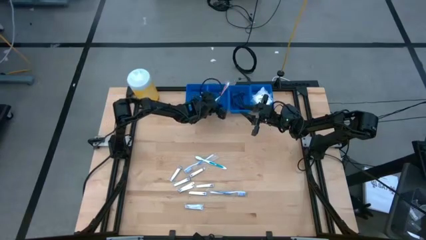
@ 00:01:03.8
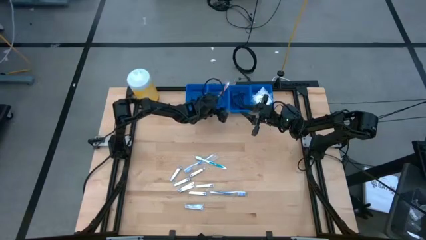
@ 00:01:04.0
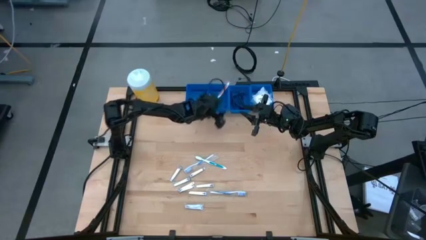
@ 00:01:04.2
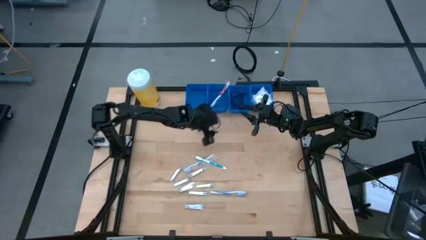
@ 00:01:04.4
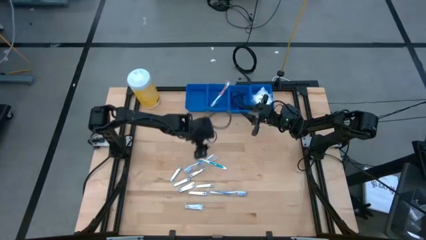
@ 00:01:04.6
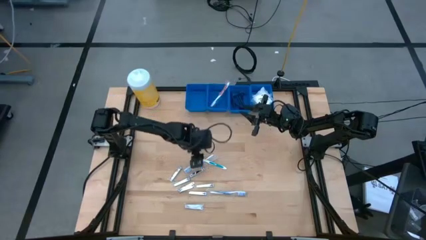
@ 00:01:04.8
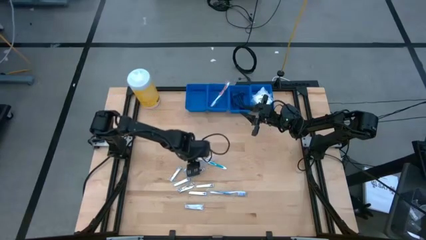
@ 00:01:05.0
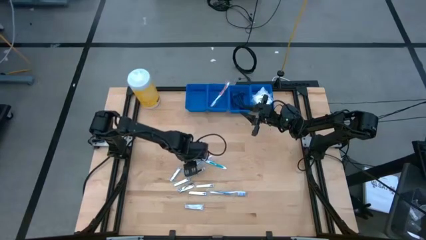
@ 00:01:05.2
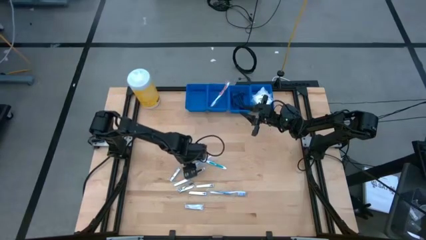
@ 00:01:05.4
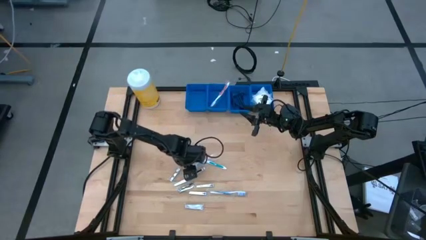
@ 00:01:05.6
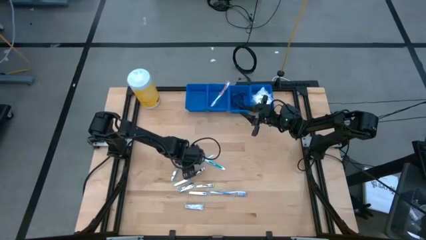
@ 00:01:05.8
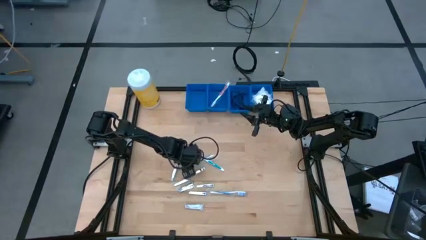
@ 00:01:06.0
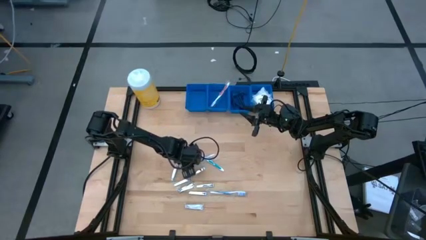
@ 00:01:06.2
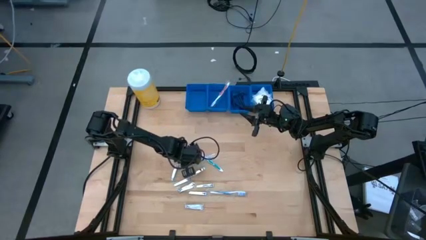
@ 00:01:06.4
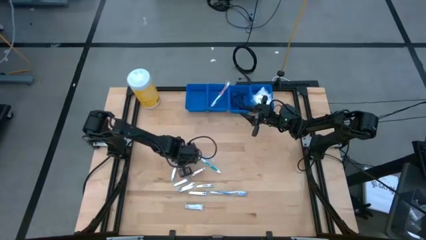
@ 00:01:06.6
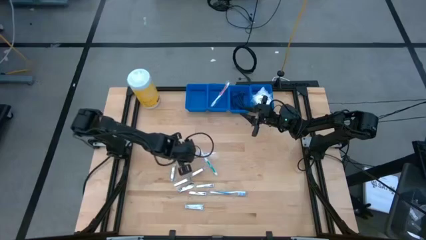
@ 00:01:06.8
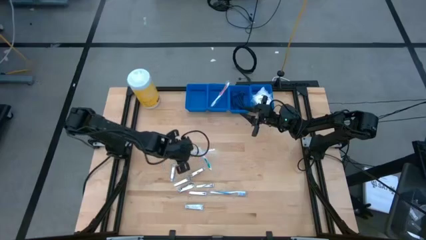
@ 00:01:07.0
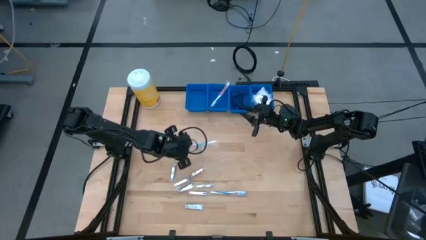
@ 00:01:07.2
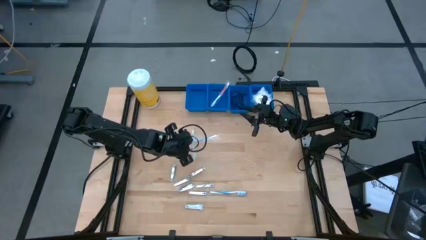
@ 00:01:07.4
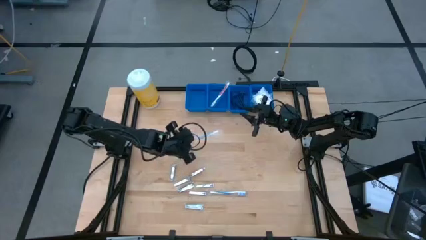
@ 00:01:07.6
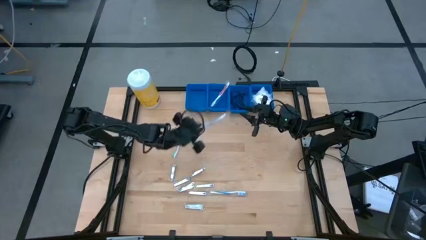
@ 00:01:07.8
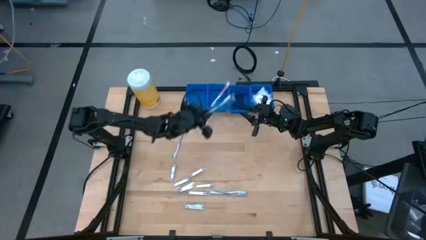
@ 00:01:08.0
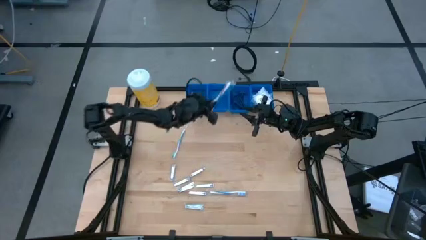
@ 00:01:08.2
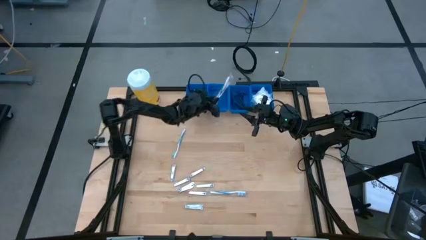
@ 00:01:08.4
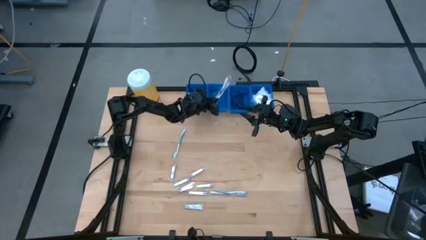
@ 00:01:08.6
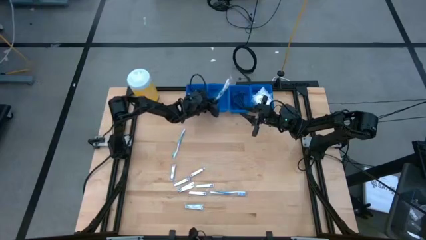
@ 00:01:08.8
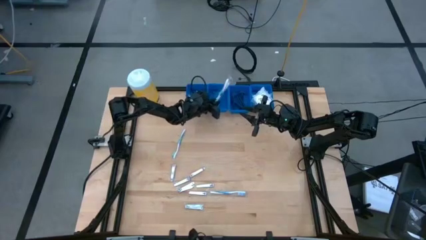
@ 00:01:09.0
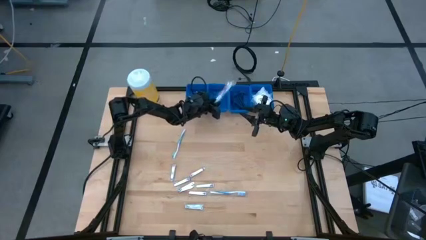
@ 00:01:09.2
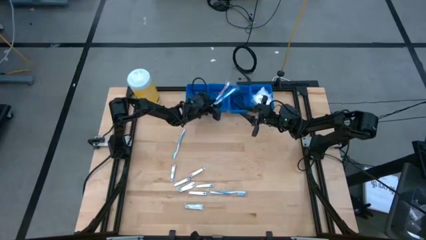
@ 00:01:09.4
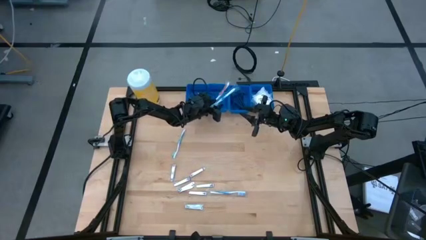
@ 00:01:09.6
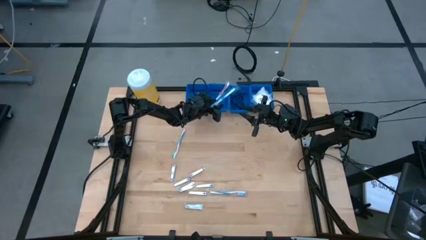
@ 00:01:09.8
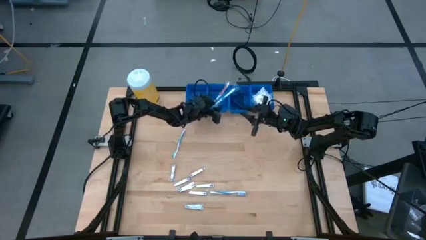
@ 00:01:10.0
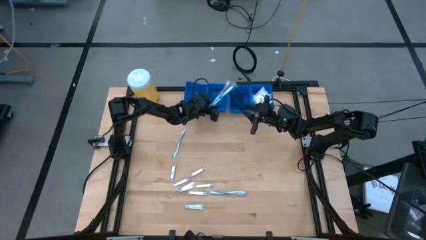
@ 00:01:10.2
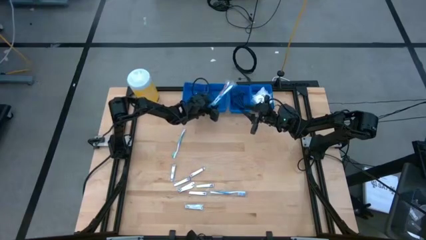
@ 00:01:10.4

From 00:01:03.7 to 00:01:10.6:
Task: Pick & Place Travel size toiletries
Put the blue toothbrush into the middle left blue basket

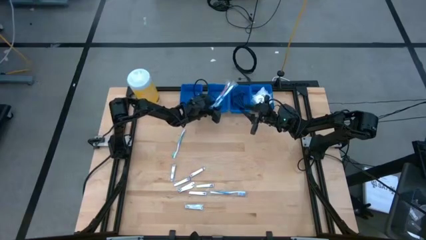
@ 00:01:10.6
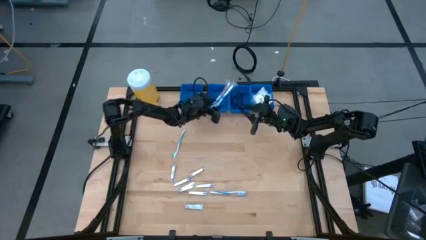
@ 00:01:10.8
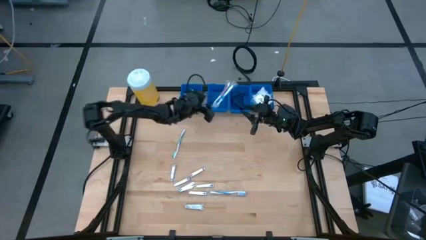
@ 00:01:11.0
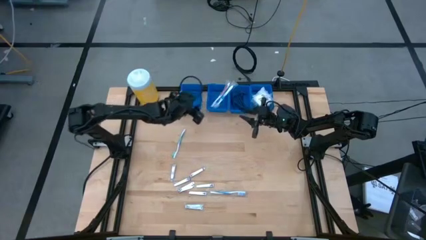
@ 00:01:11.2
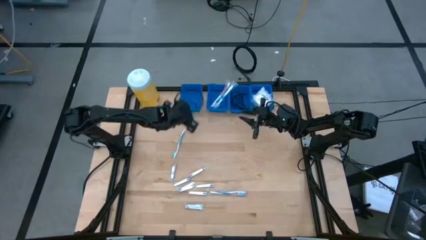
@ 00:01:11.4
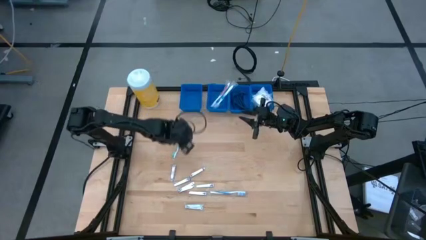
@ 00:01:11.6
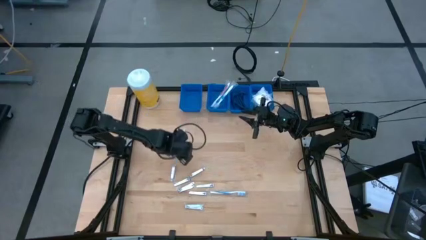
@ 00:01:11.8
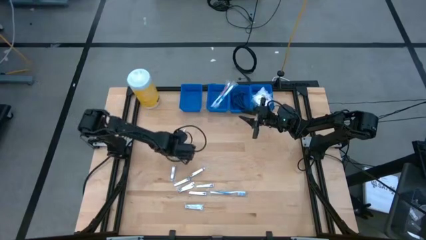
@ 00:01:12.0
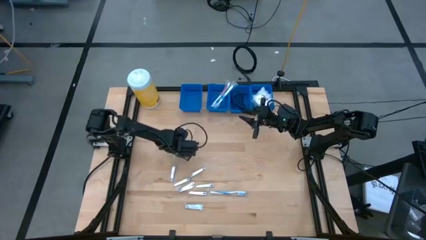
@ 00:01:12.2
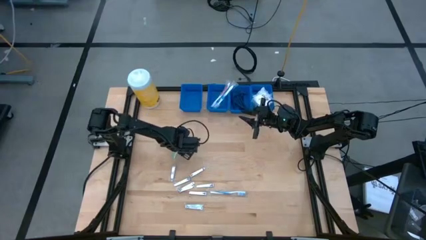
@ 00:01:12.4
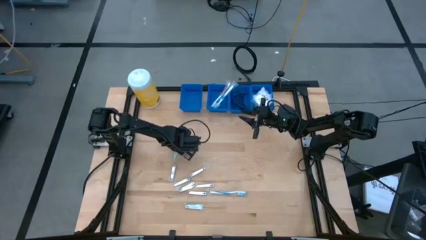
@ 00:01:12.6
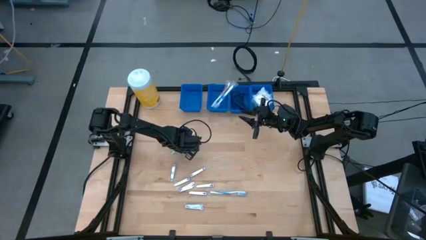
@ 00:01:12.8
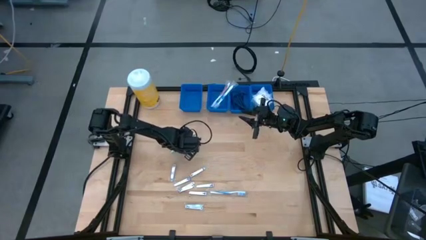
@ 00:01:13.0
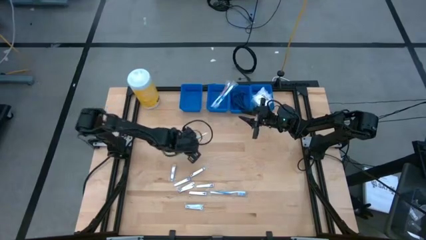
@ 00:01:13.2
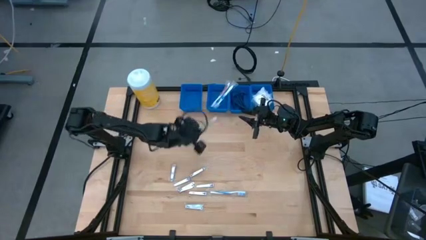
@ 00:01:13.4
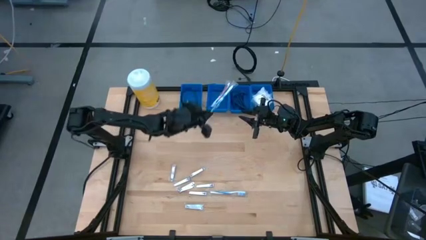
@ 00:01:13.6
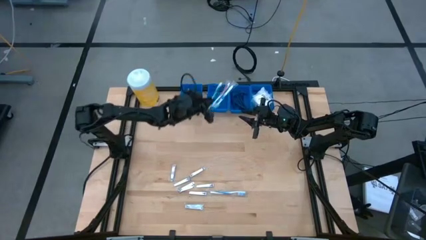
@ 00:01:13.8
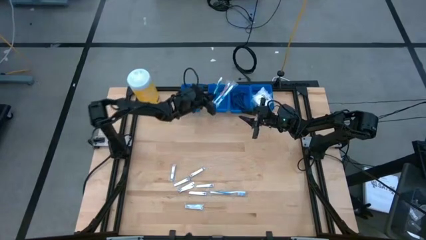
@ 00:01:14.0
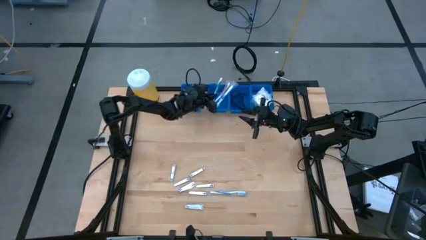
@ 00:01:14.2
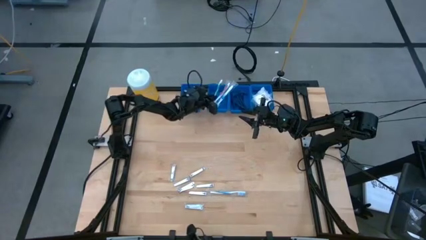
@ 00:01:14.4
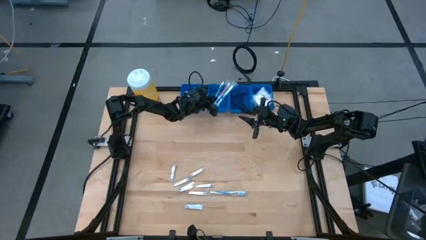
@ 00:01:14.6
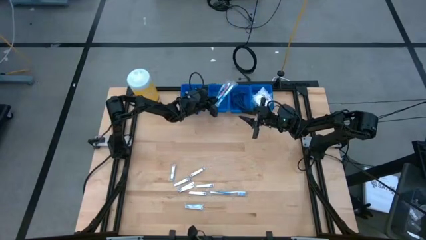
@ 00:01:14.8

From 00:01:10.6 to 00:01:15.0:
Put the green toothbrush into the middle left blue basket

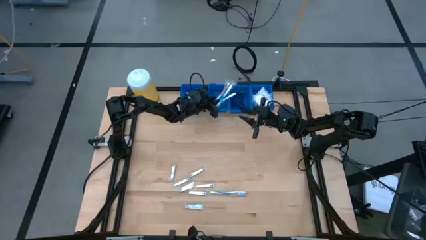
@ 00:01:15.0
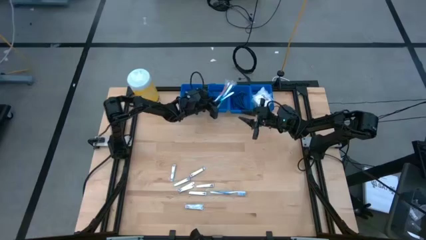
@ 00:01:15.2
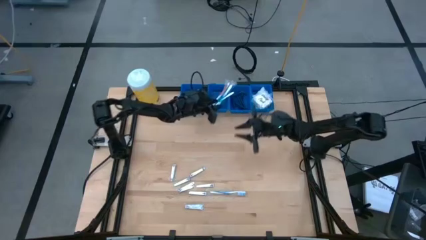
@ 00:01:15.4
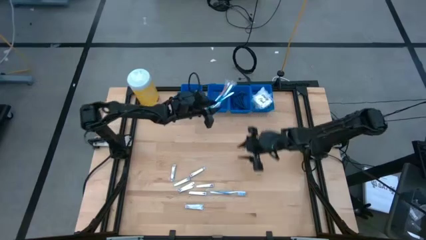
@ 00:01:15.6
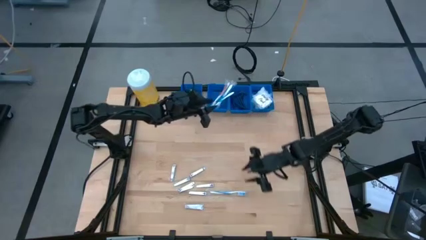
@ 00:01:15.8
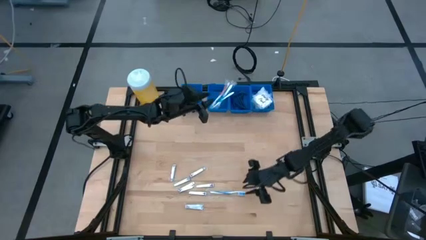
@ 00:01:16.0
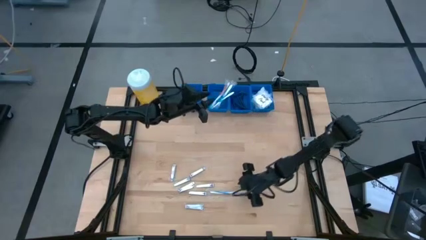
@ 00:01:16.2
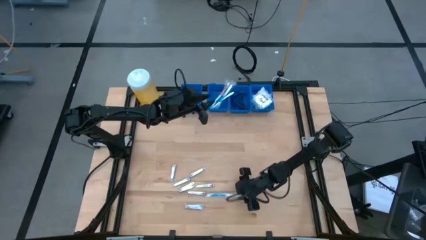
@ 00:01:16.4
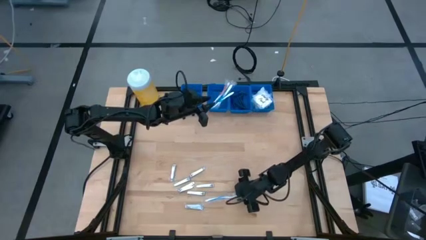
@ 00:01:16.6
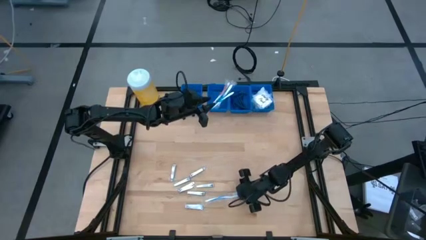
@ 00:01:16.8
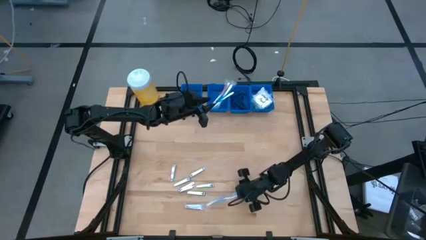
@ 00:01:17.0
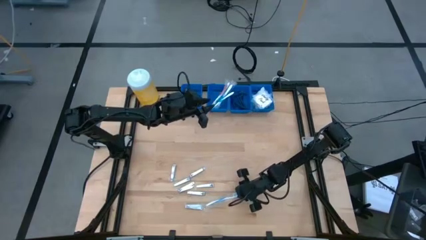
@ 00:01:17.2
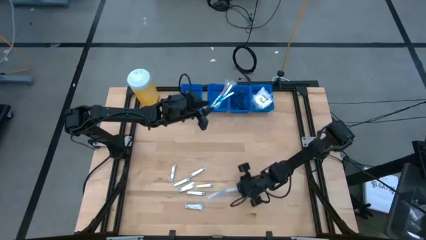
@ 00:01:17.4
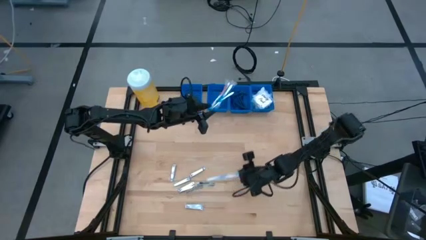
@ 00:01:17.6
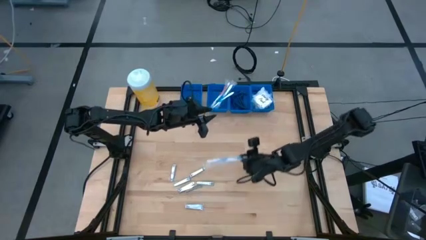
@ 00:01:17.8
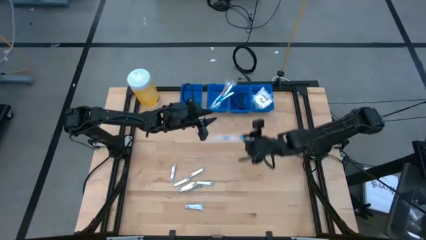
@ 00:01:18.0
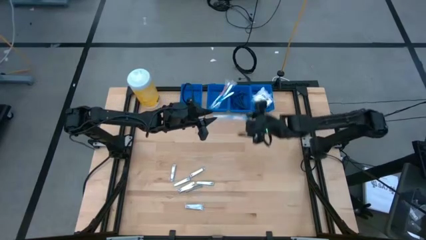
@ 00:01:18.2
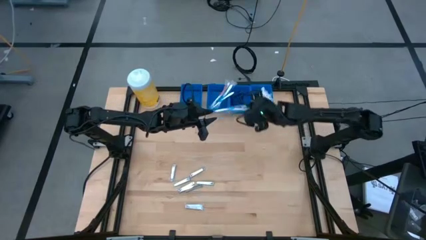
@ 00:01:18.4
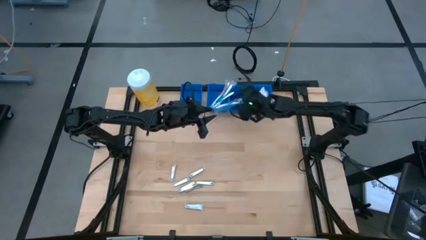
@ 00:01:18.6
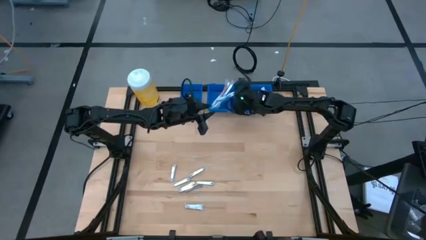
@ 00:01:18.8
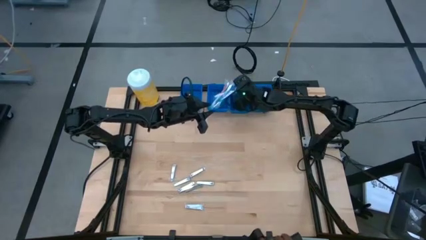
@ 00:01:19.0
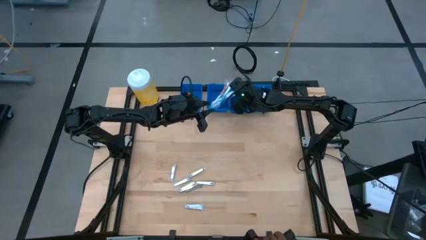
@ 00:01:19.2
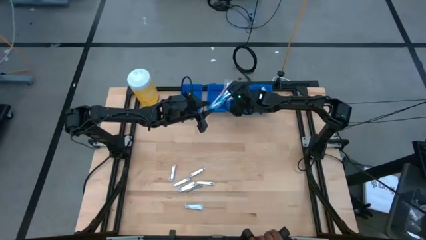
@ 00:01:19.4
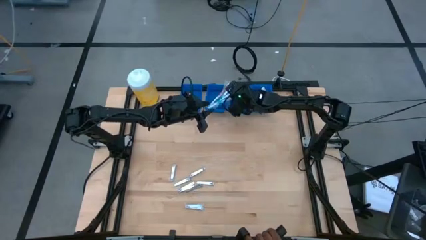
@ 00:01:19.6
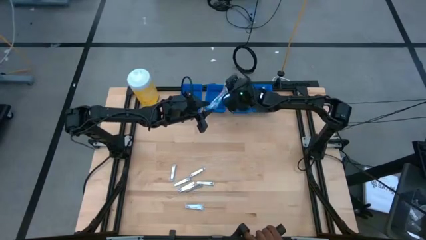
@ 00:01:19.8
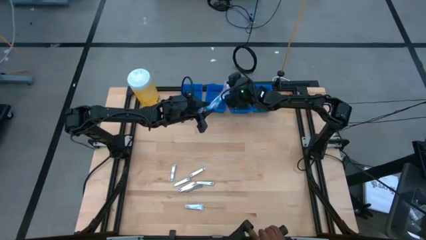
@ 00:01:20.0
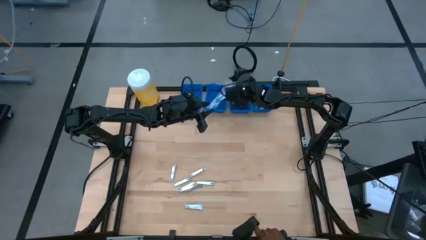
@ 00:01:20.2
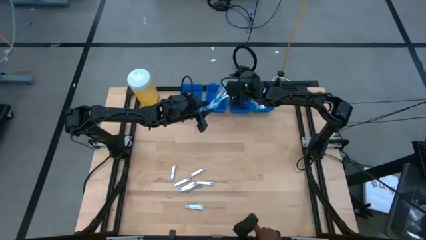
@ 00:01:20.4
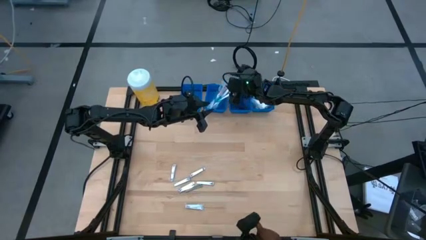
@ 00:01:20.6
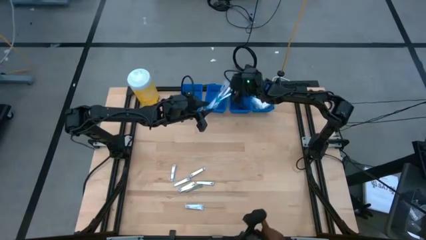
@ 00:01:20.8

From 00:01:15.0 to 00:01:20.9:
Put the blue toothbrush into the middle left blue basket
